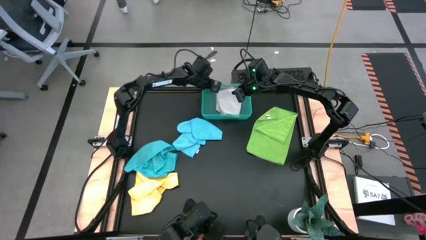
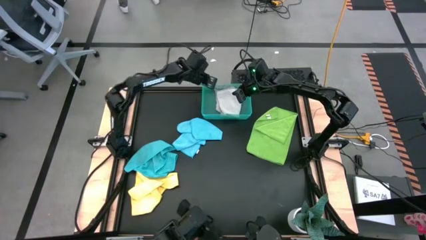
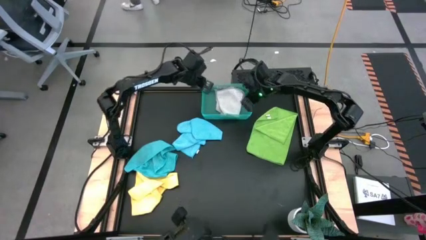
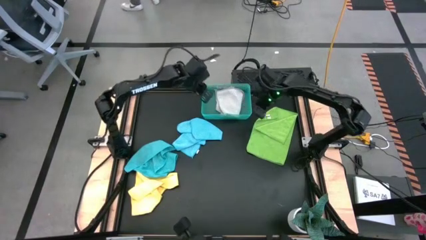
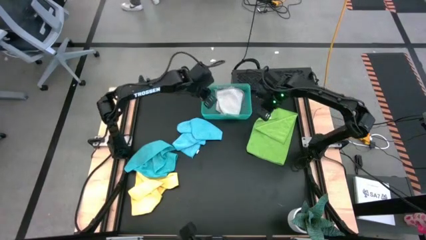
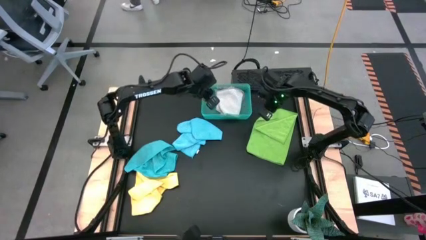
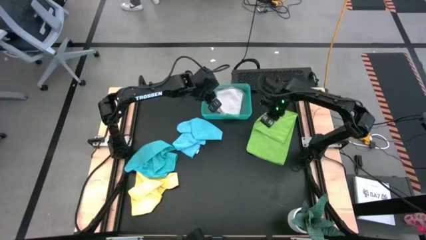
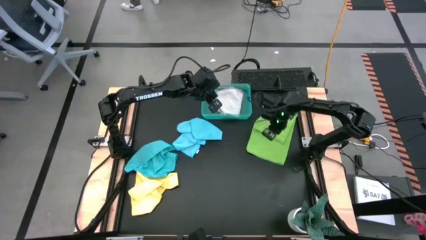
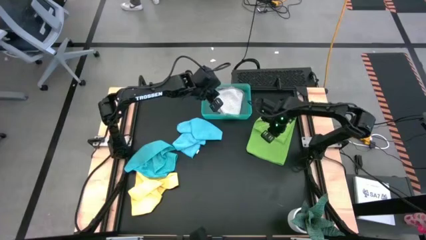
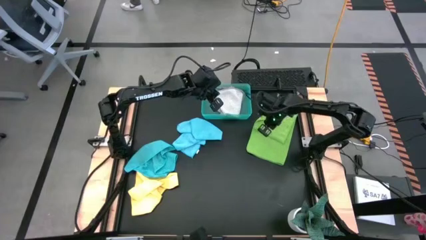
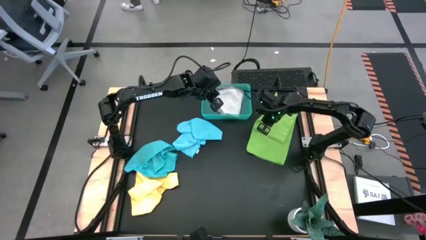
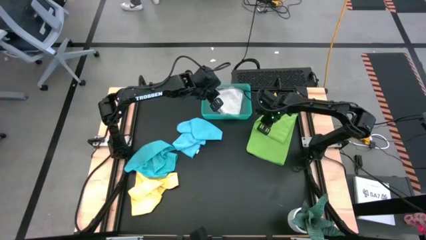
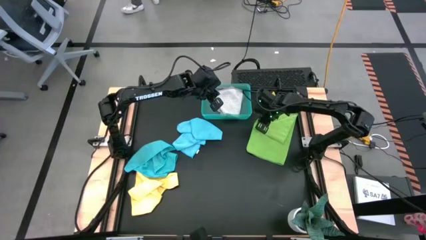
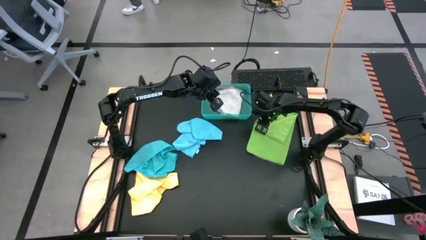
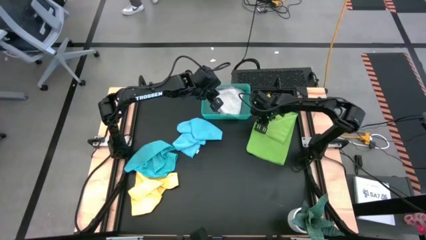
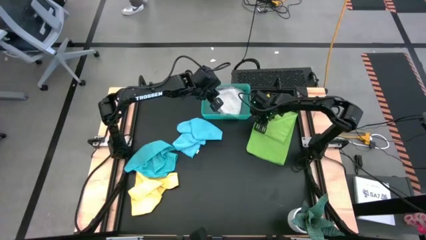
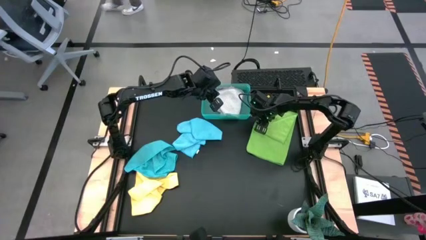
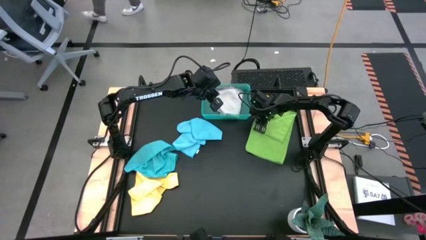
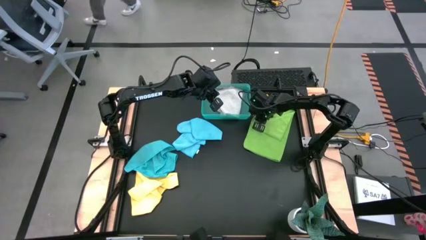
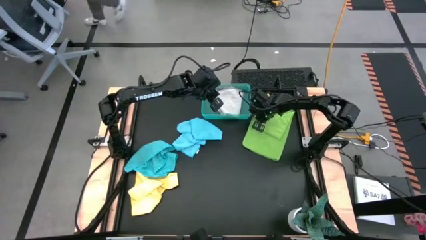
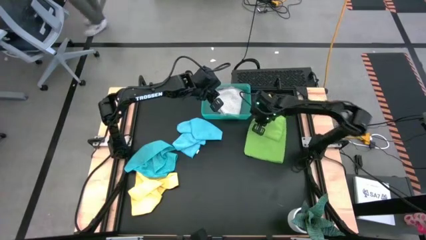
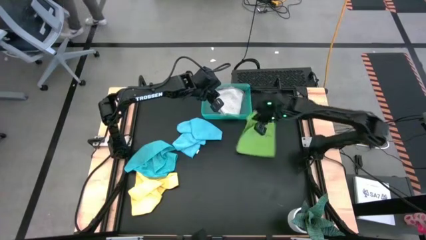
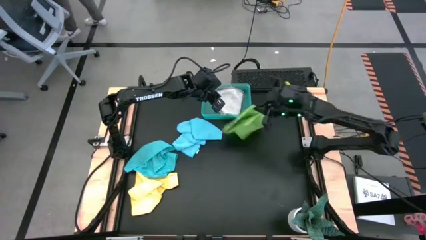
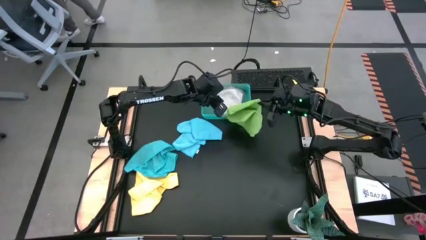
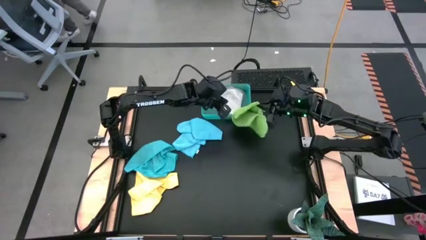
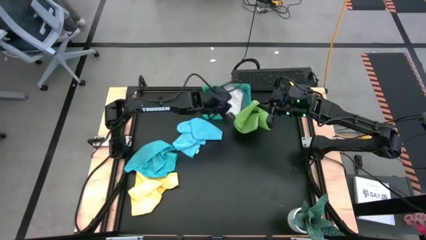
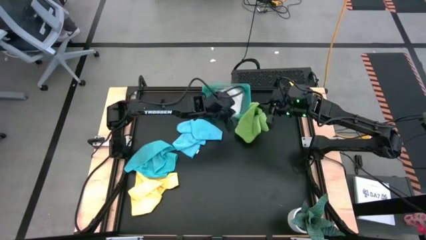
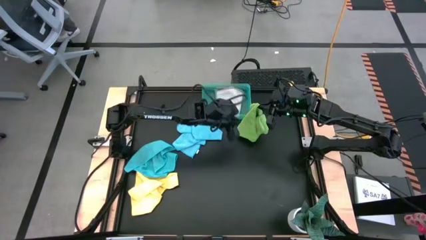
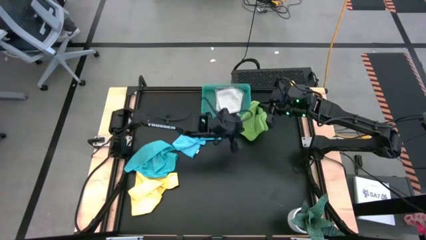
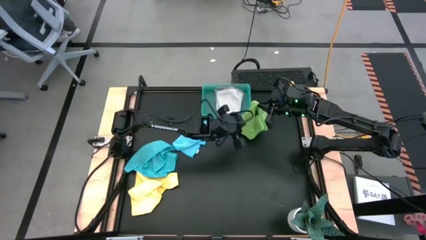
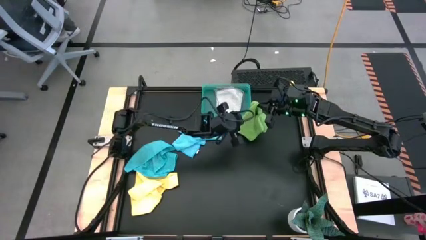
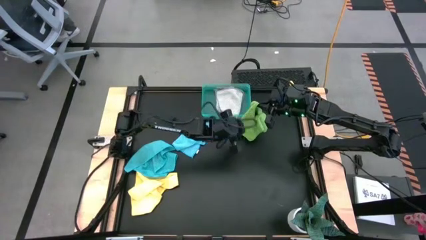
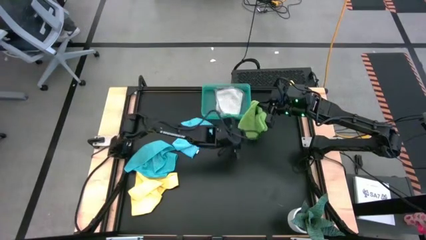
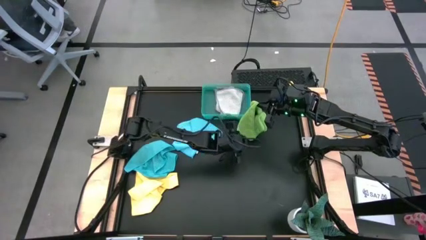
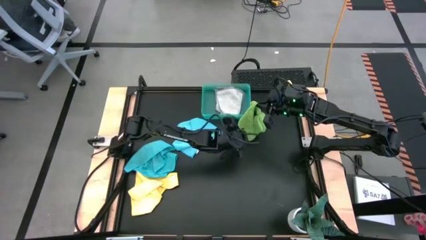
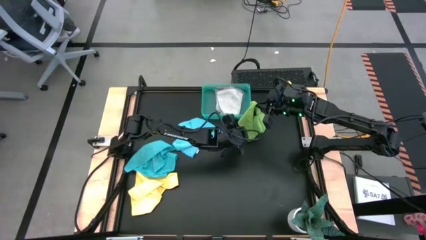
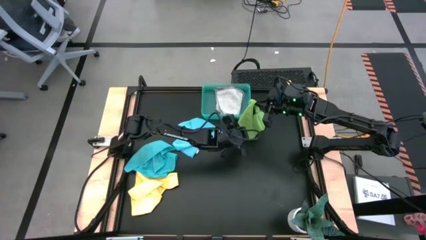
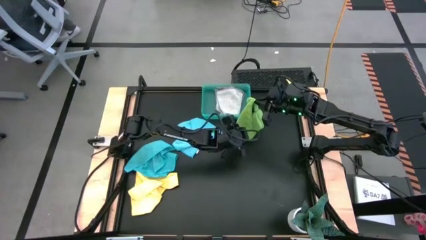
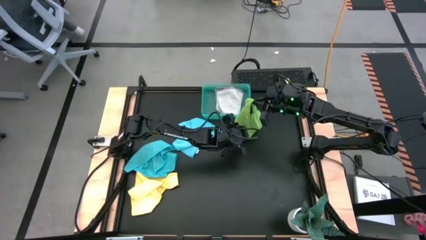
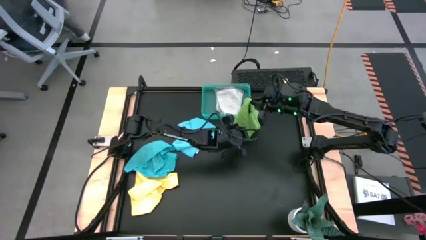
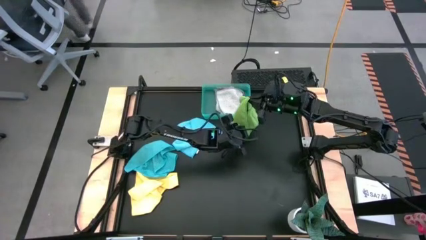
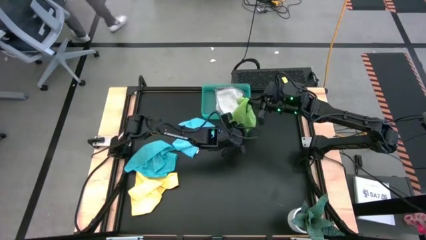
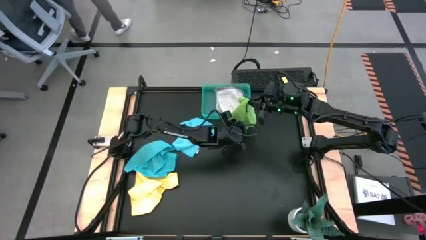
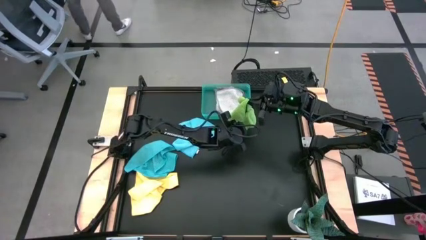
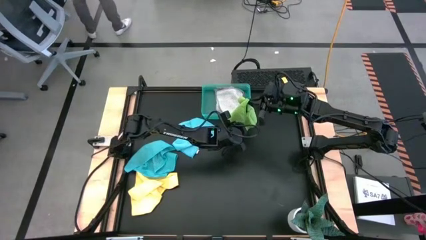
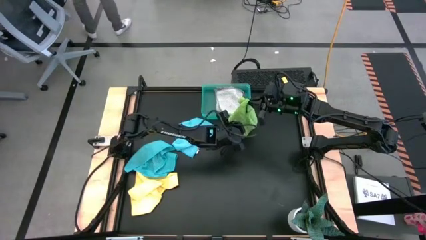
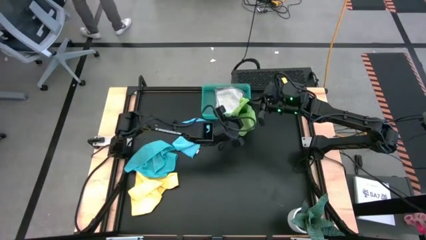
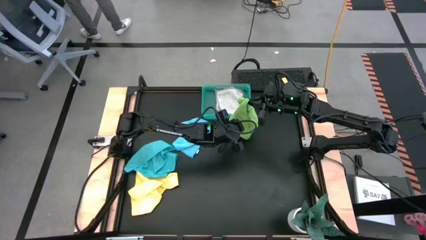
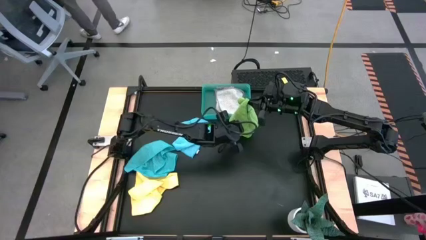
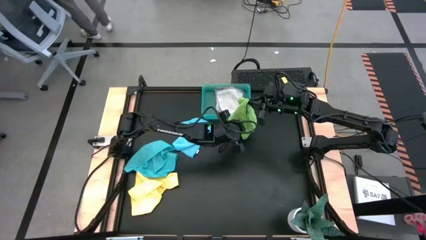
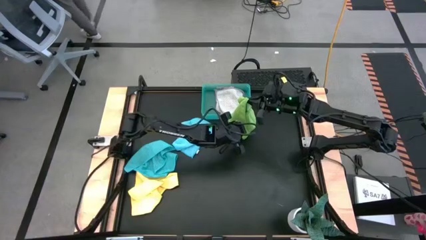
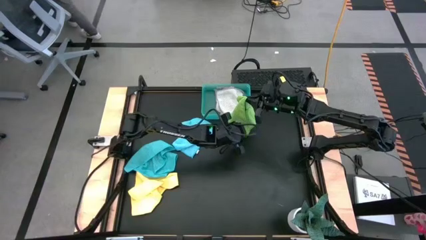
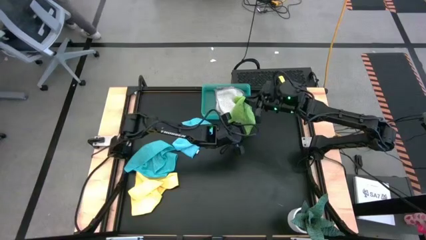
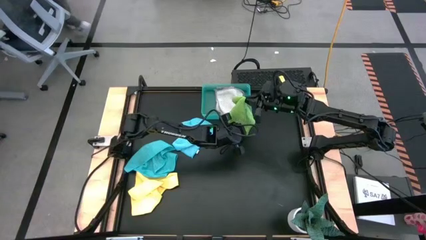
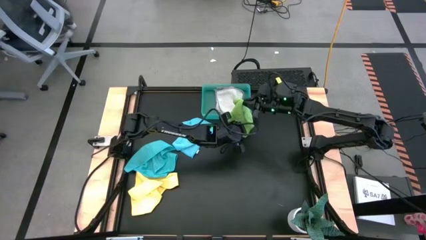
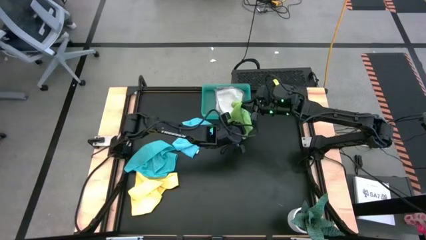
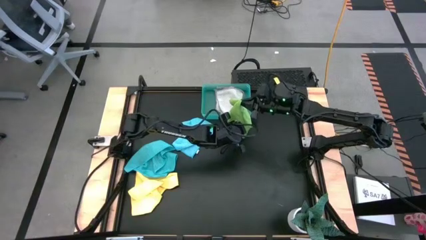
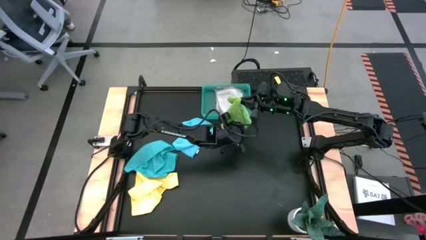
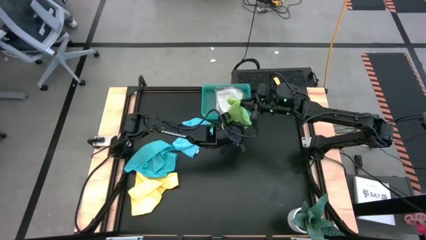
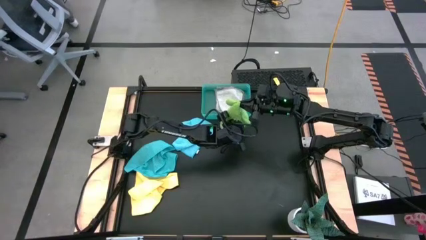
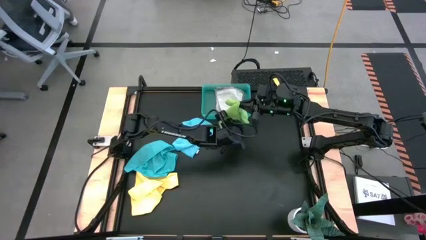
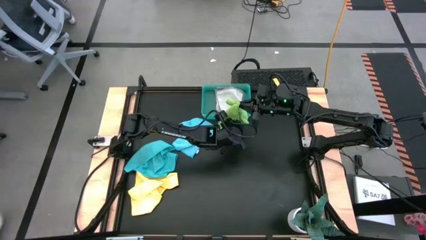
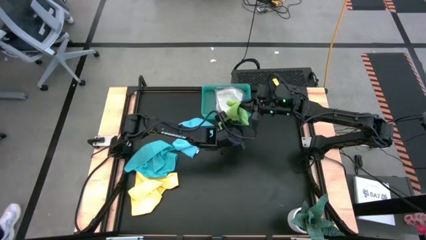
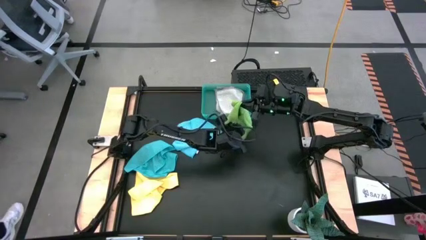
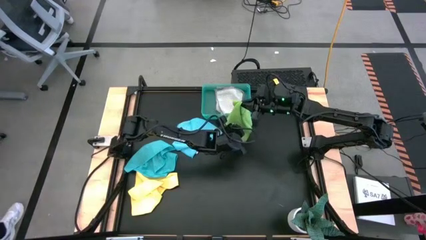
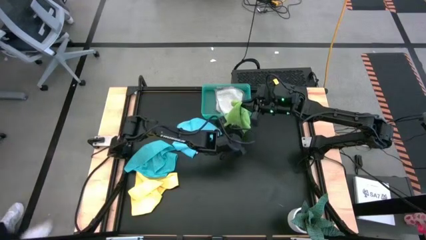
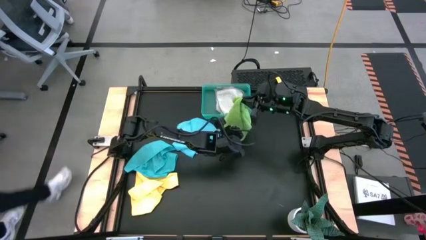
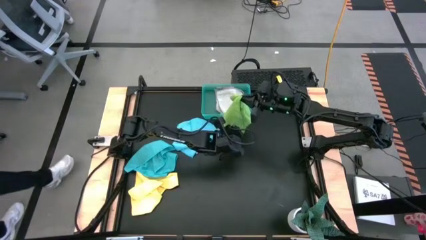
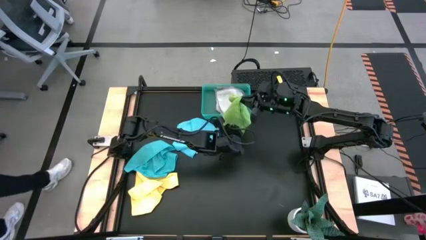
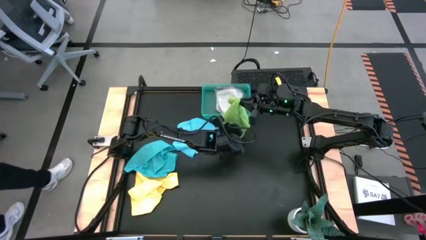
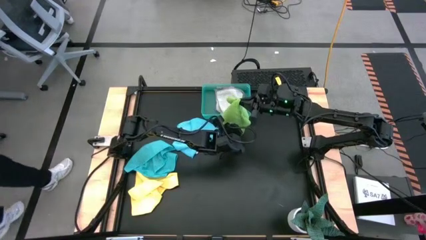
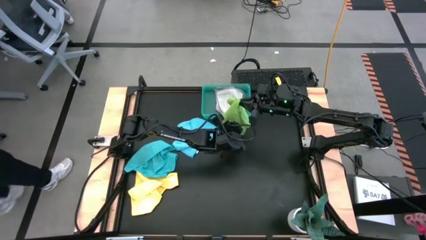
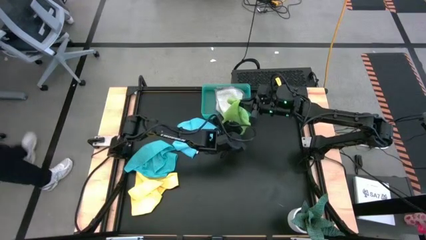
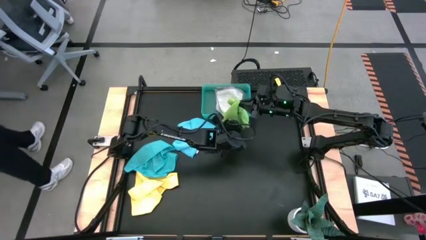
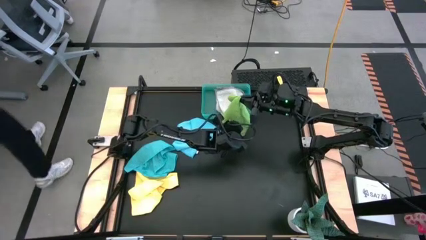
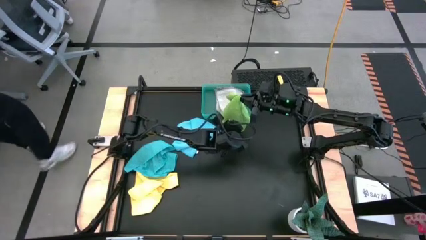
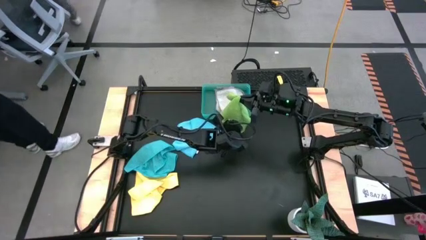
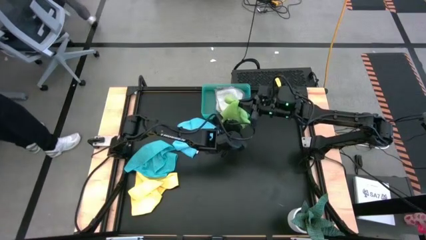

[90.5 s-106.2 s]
Task: Fold microfiber towels
Fold the green microfiber towel
